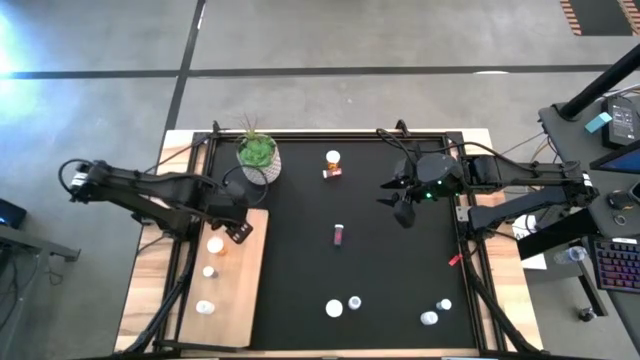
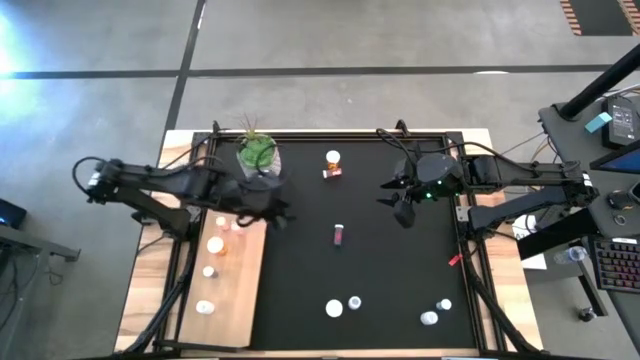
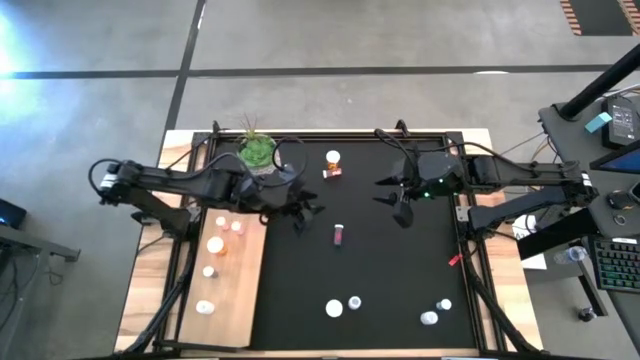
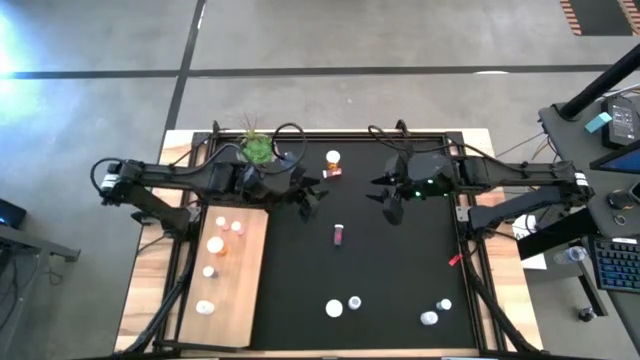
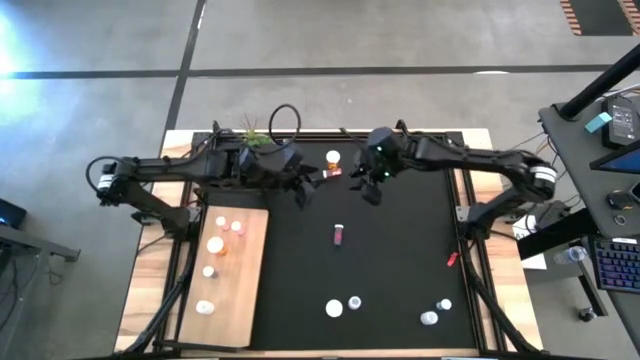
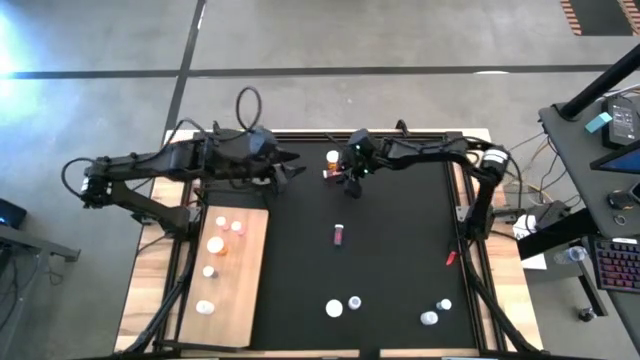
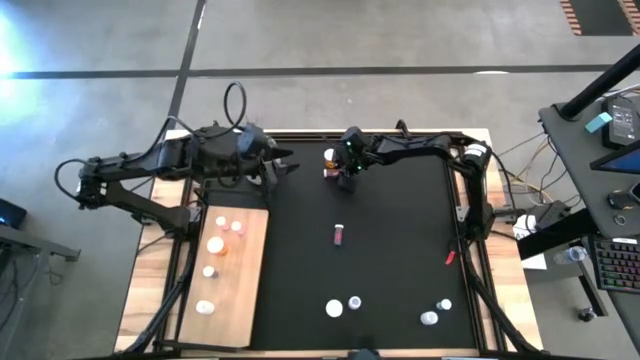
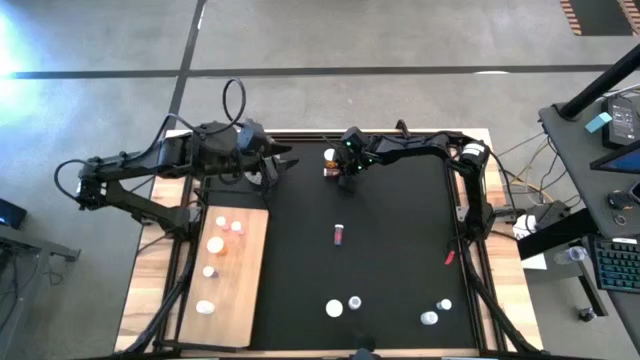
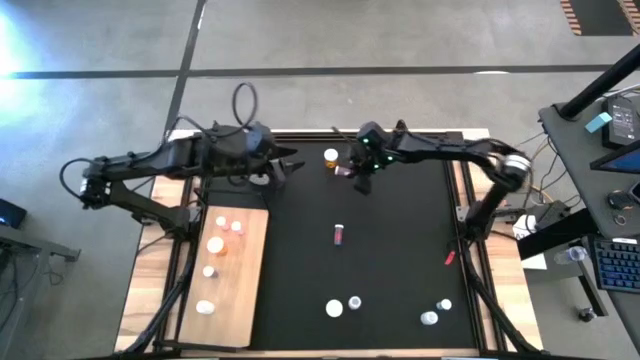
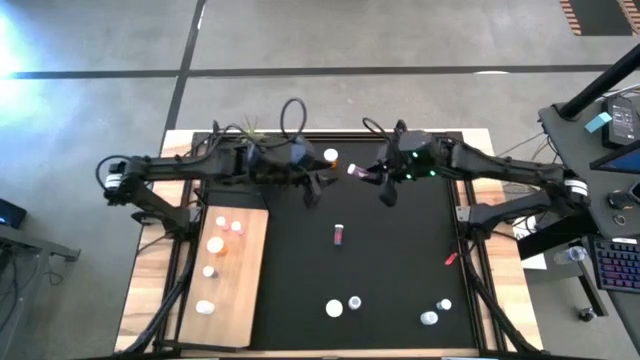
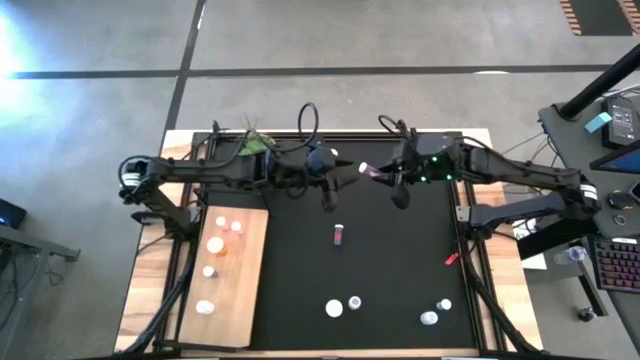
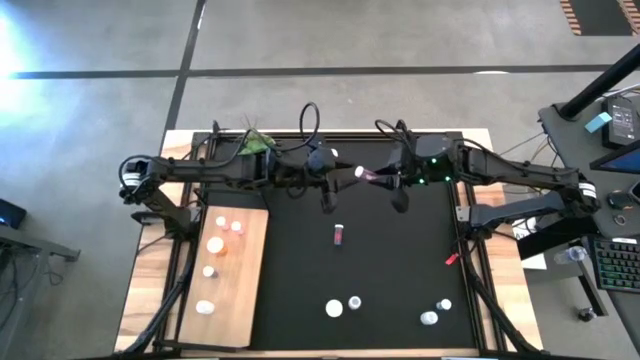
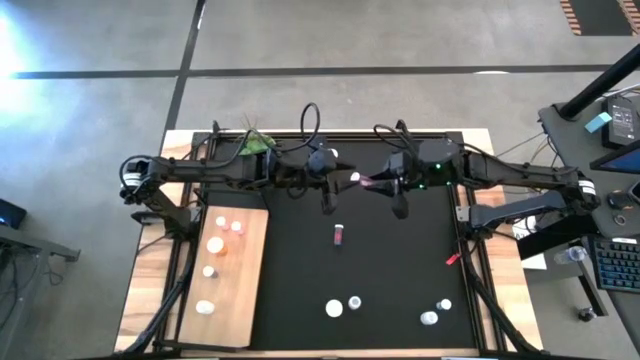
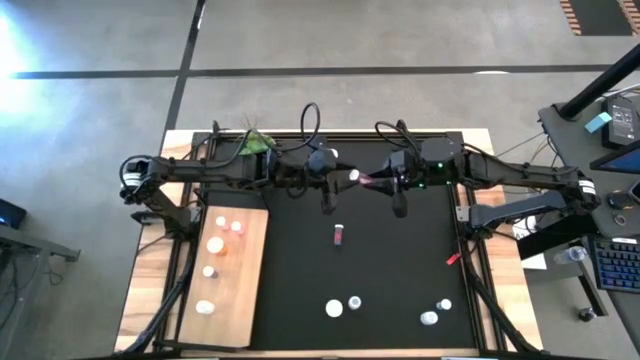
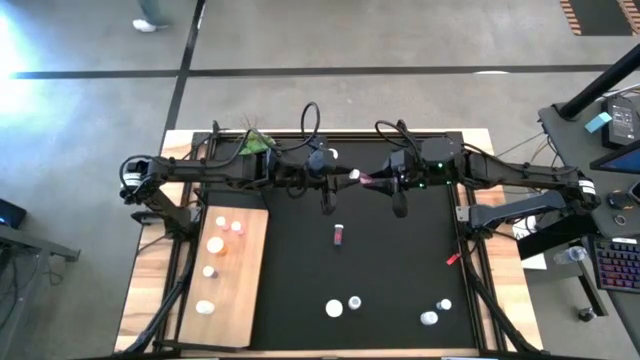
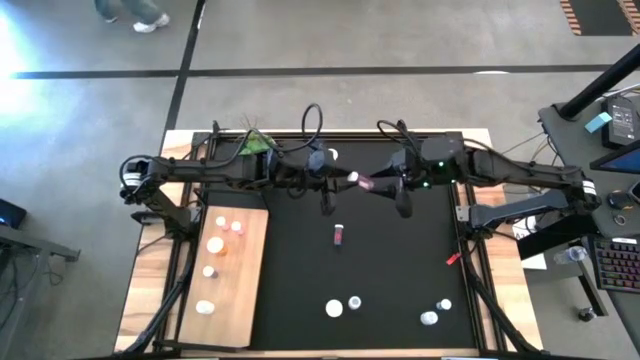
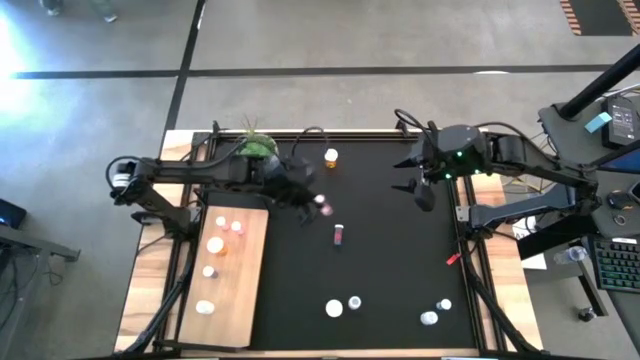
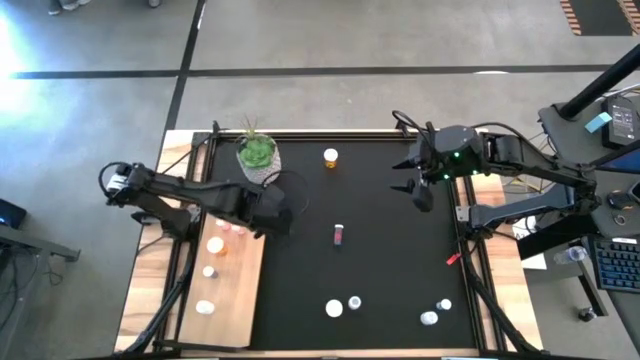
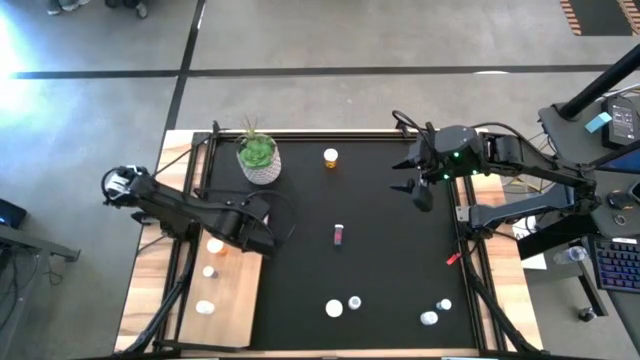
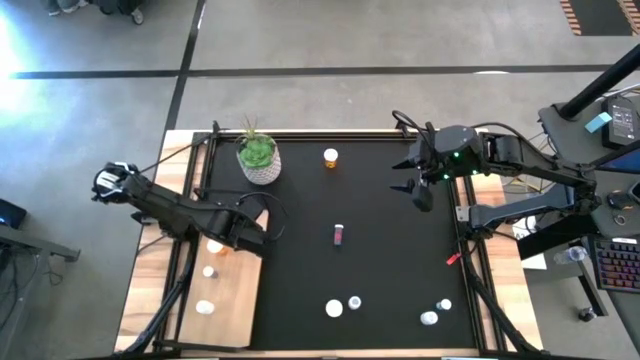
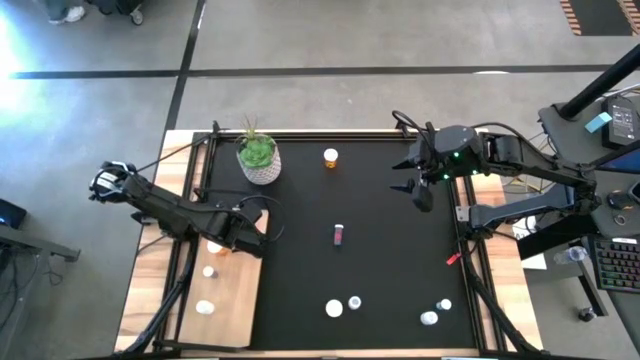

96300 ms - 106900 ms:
Task: Pick and place medicine bottles onto shelf by color
Put the pink pill bottle on the shelf aligned with the other pink pill bottles

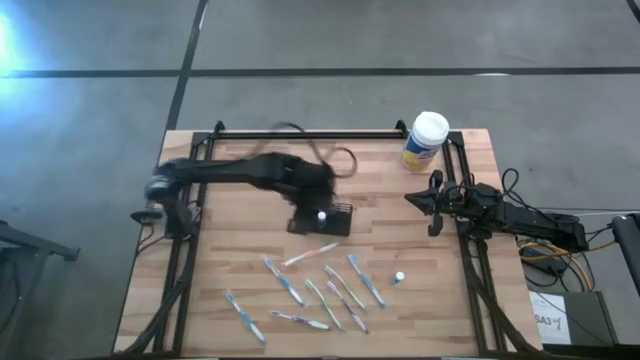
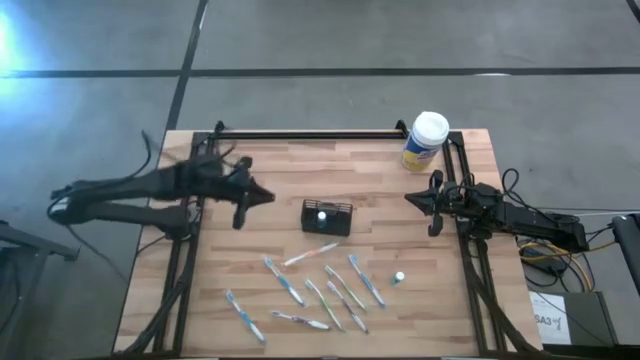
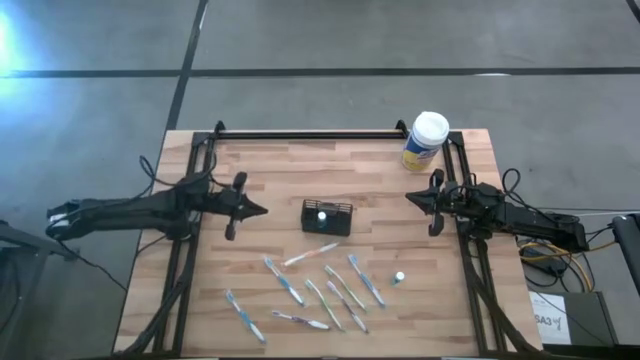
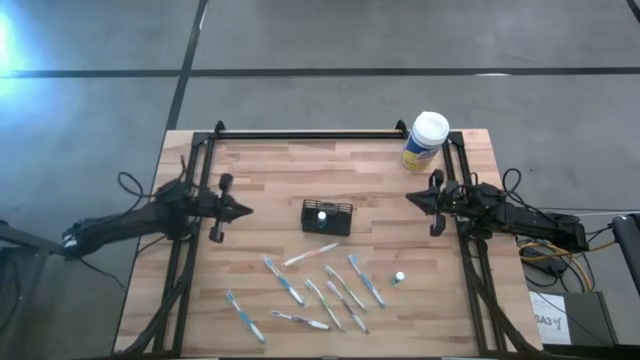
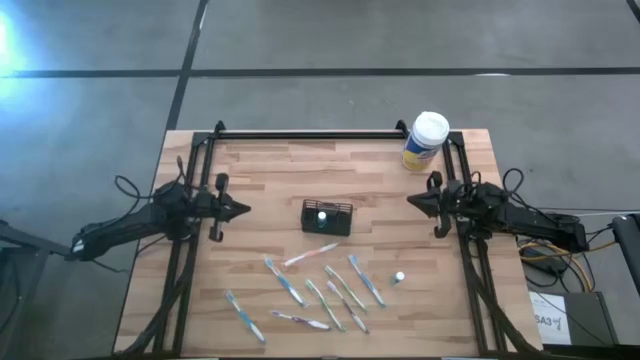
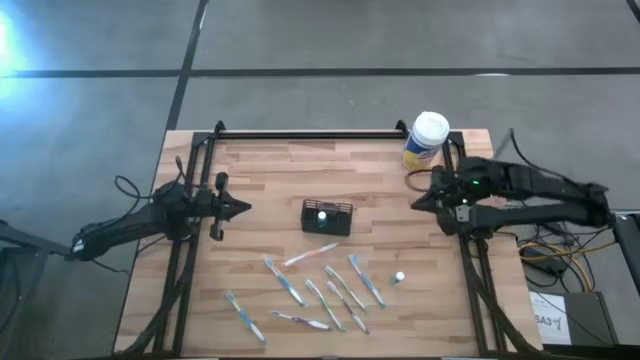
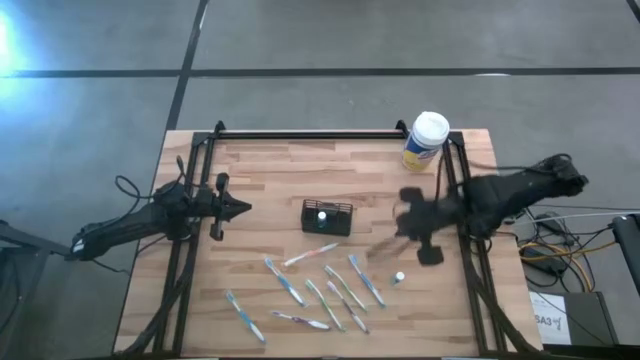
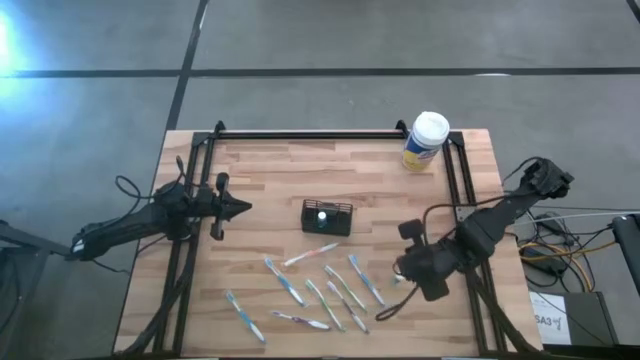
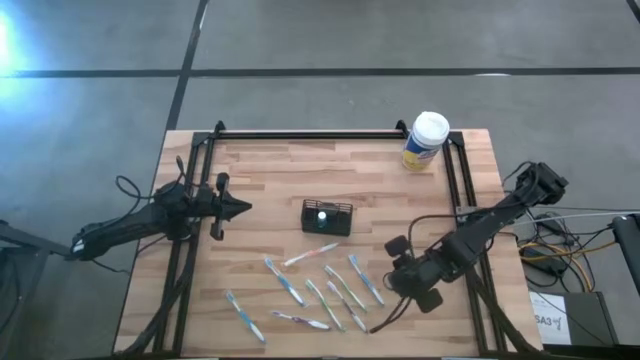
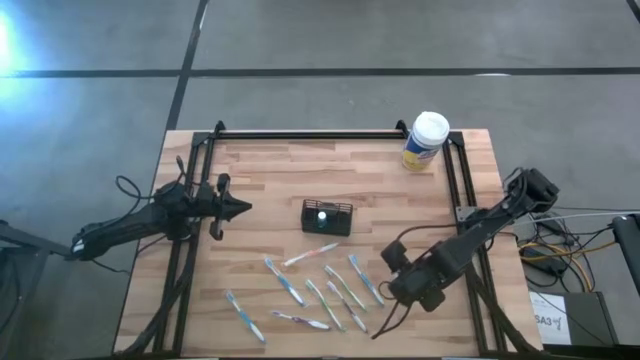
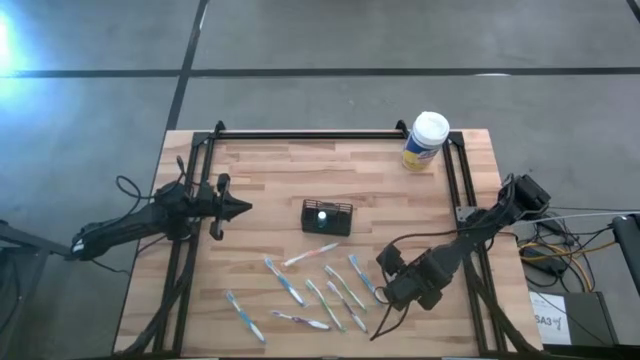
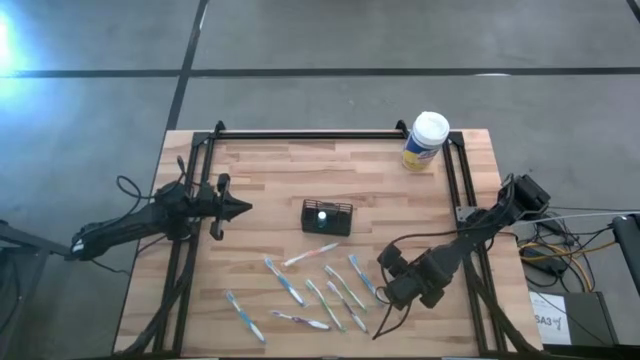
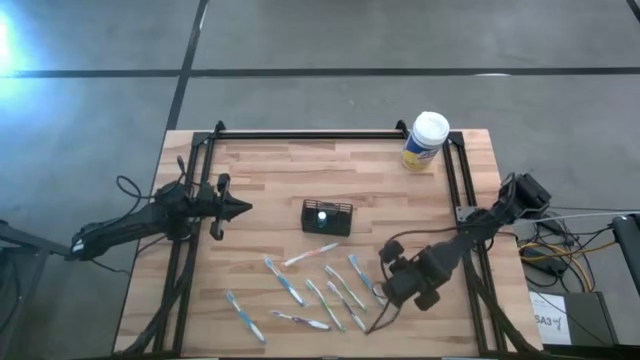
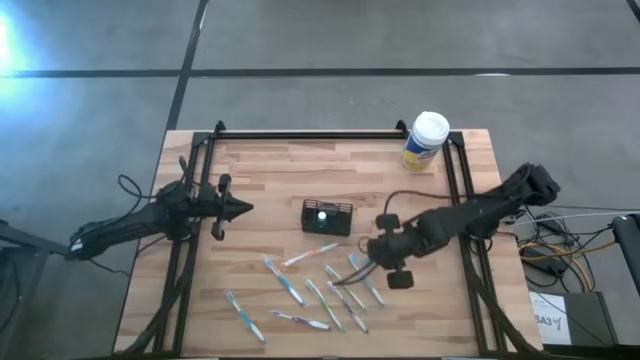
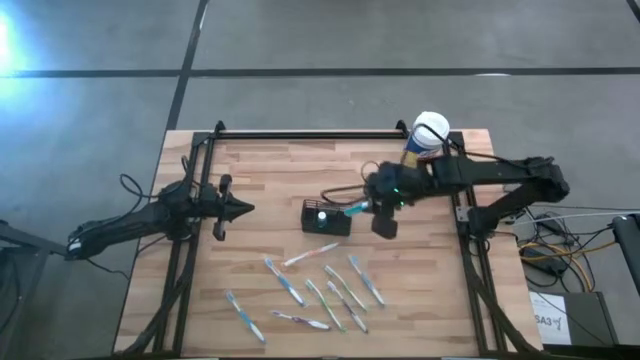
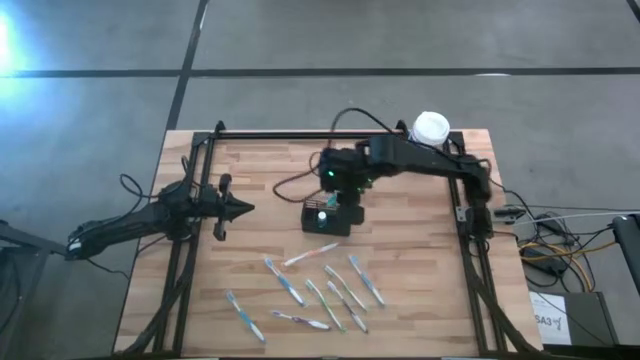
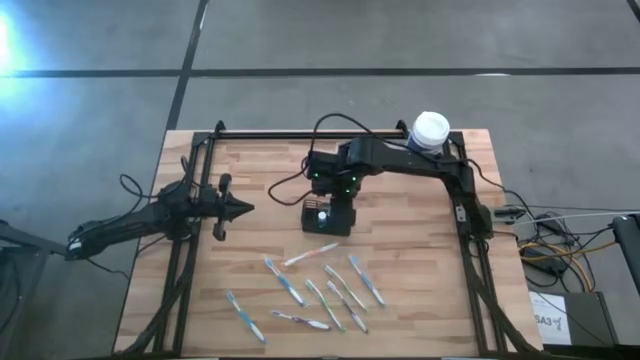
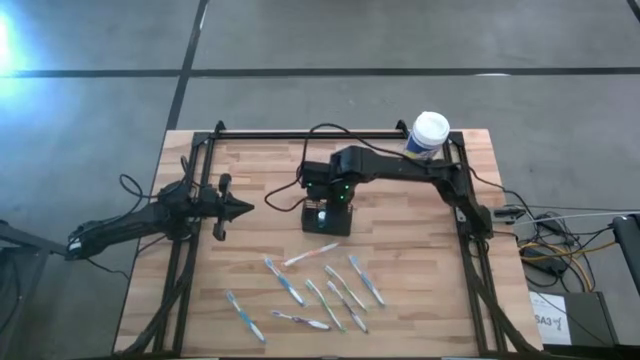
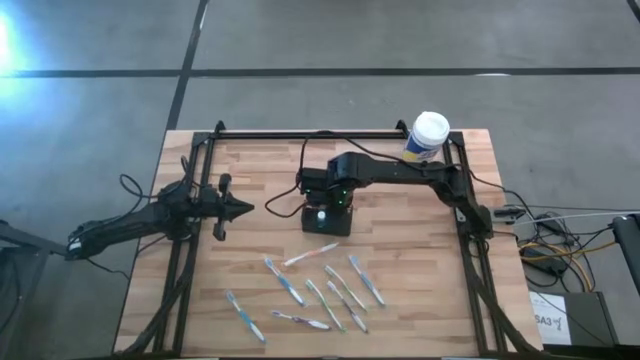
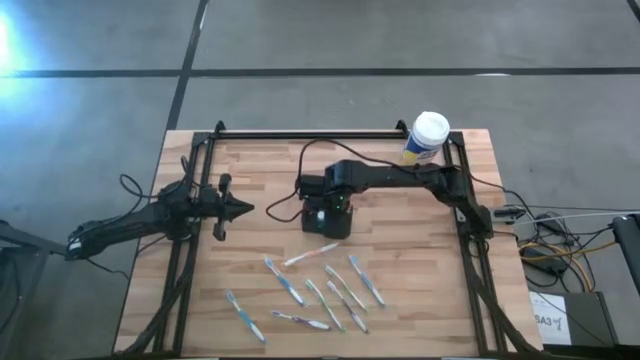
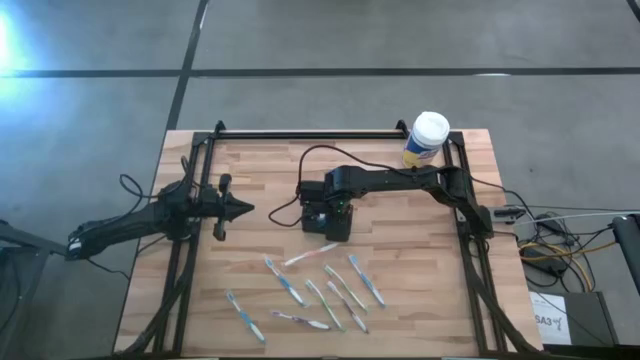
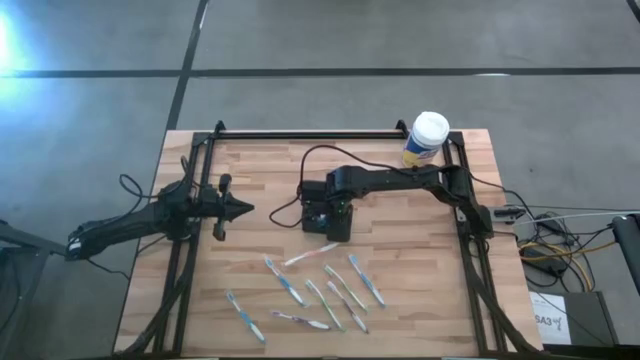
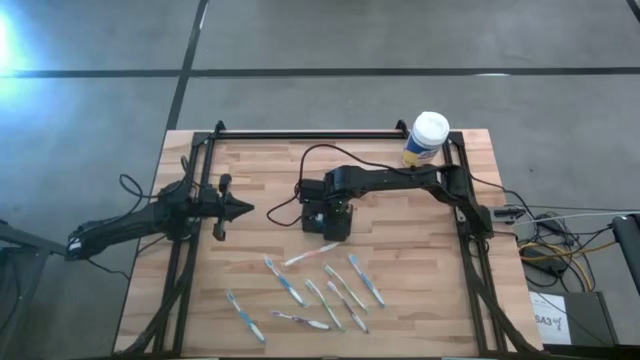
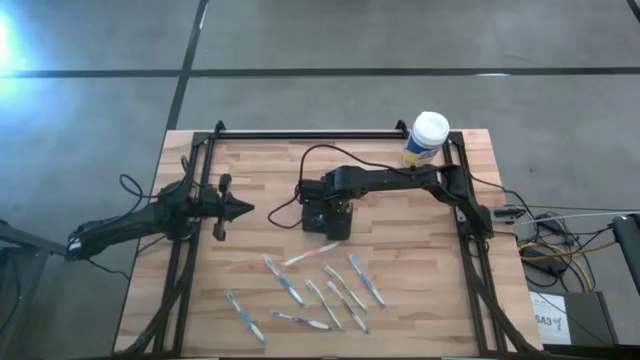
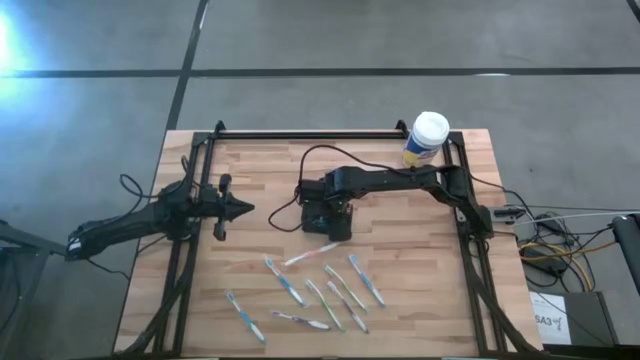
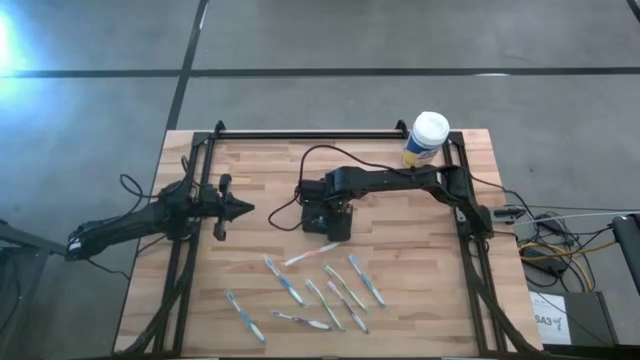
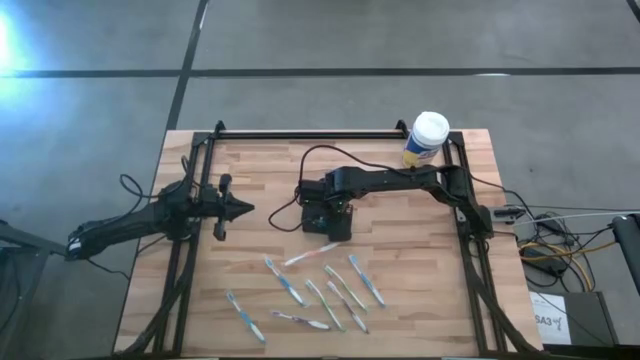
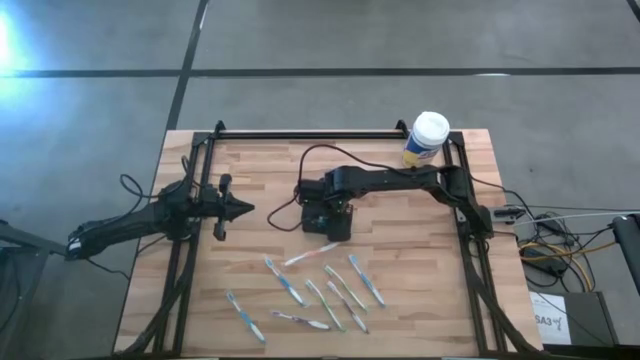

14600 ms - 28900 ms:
Task: Pick & Place toothbrushing station
Put the blue mouthwash into the black mesh organizer
